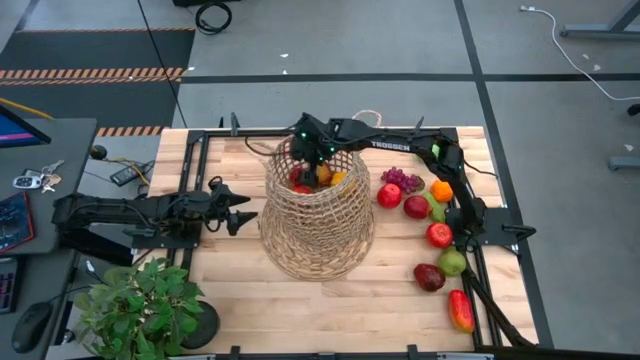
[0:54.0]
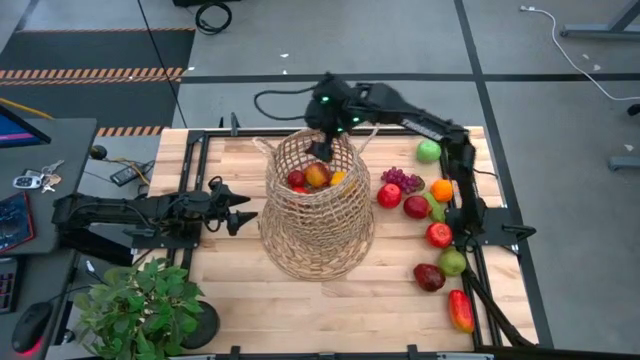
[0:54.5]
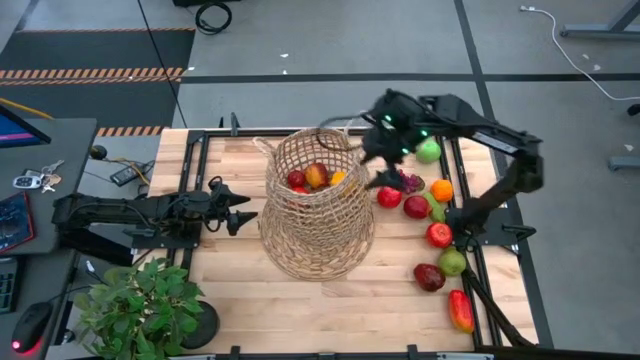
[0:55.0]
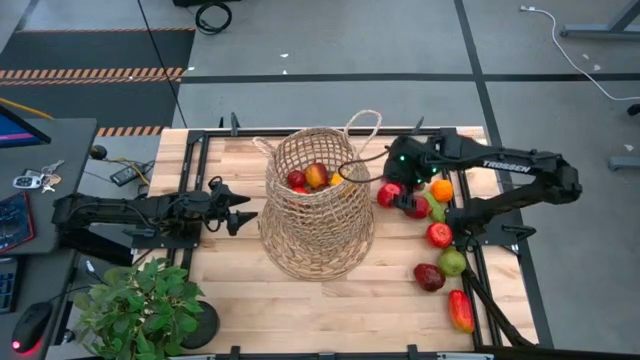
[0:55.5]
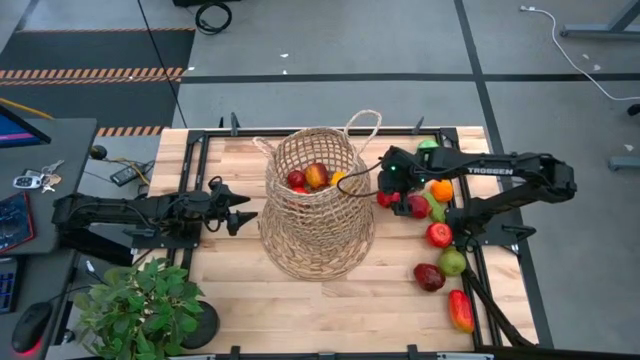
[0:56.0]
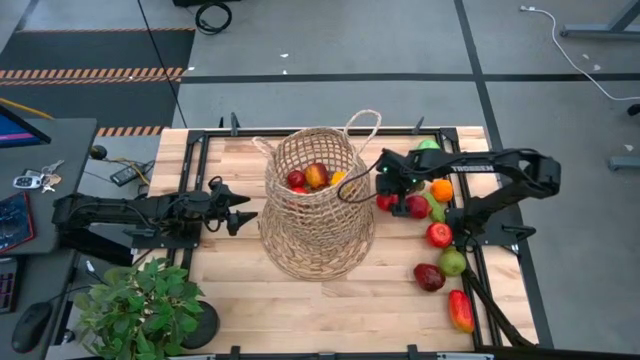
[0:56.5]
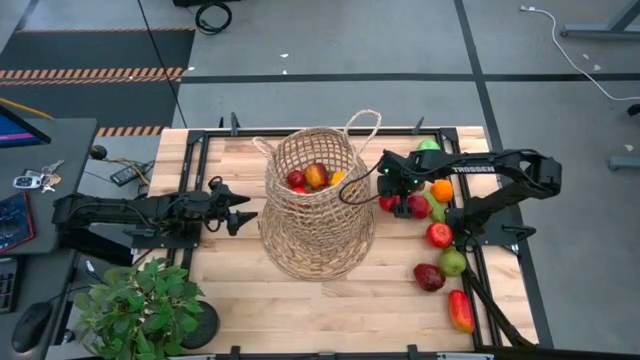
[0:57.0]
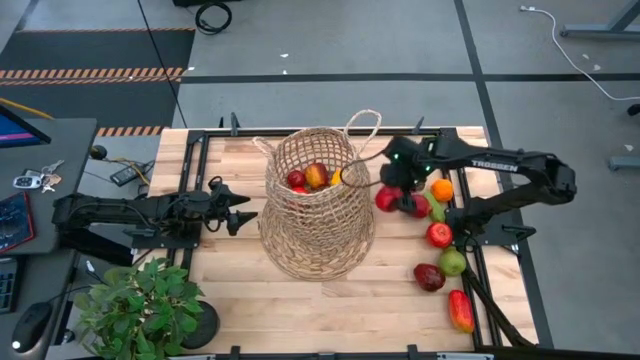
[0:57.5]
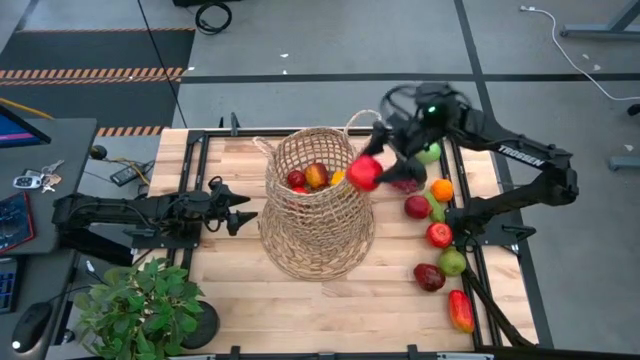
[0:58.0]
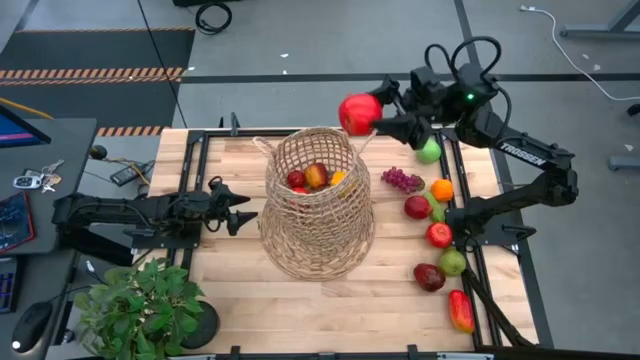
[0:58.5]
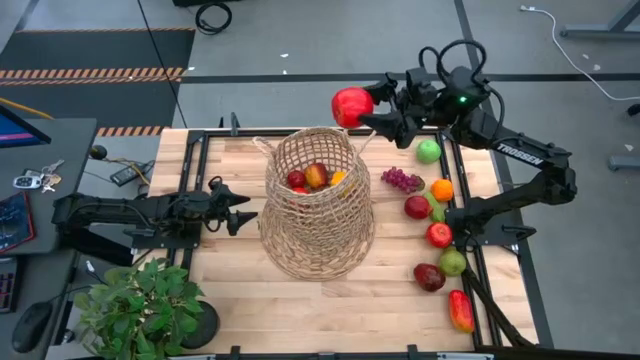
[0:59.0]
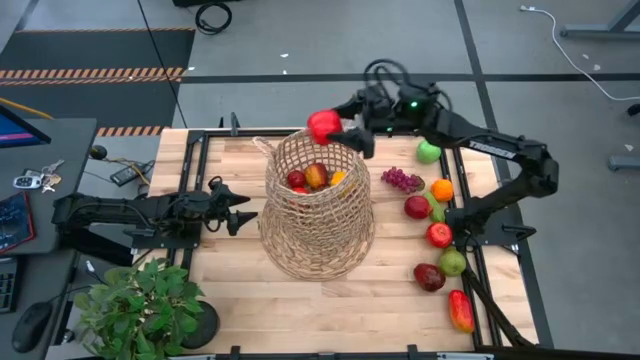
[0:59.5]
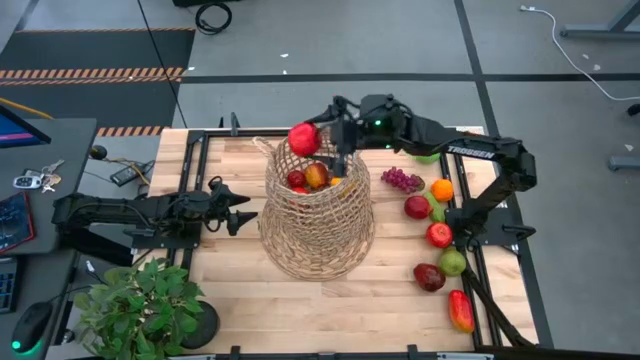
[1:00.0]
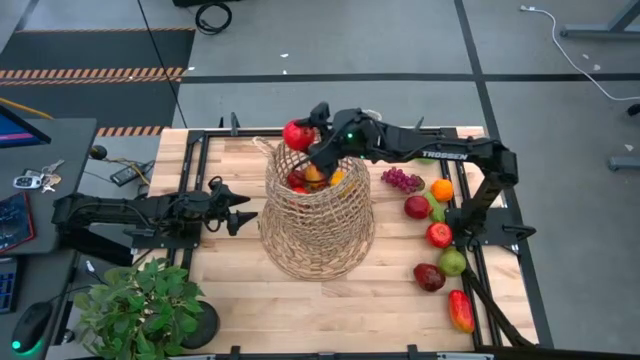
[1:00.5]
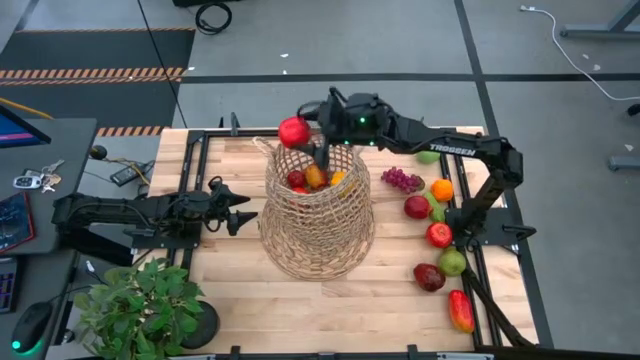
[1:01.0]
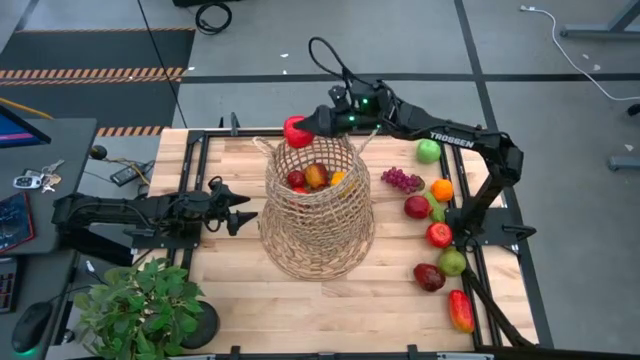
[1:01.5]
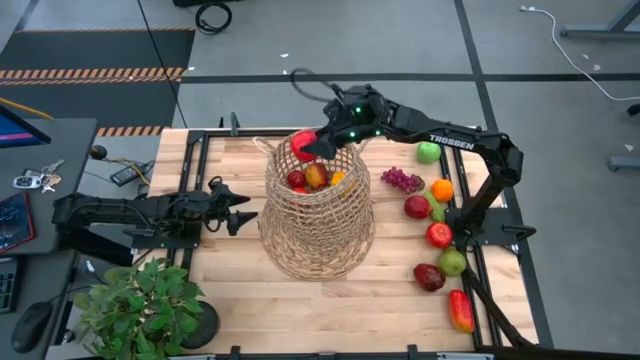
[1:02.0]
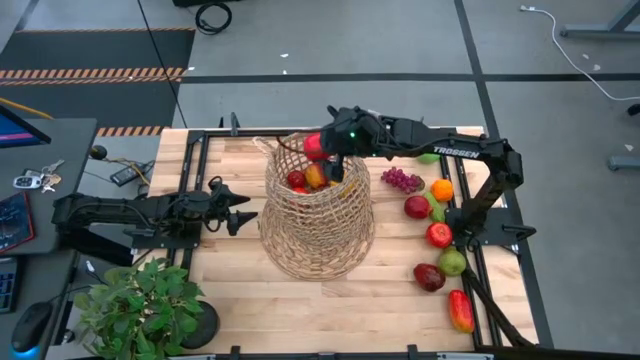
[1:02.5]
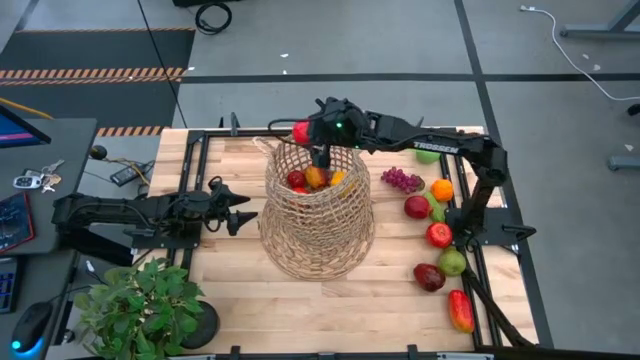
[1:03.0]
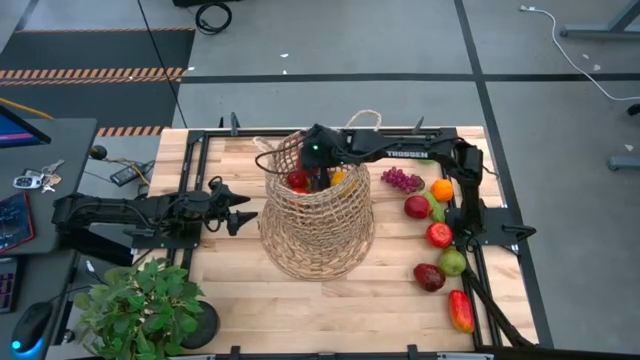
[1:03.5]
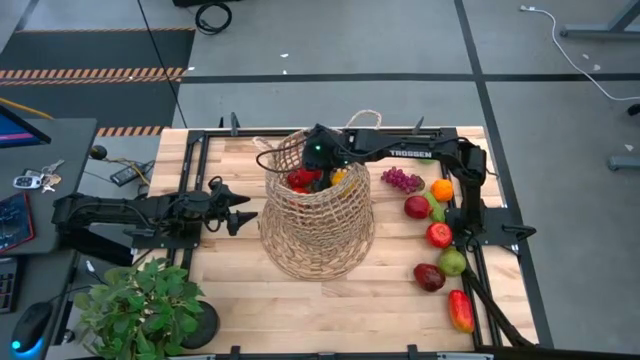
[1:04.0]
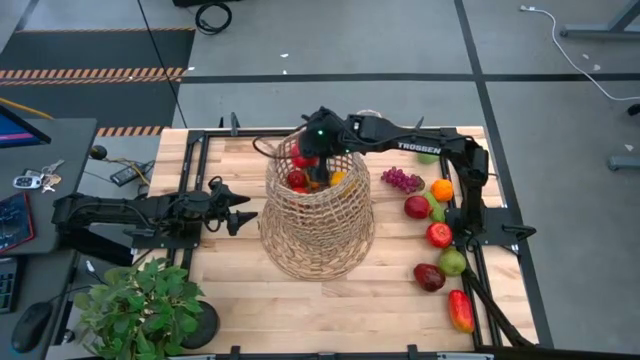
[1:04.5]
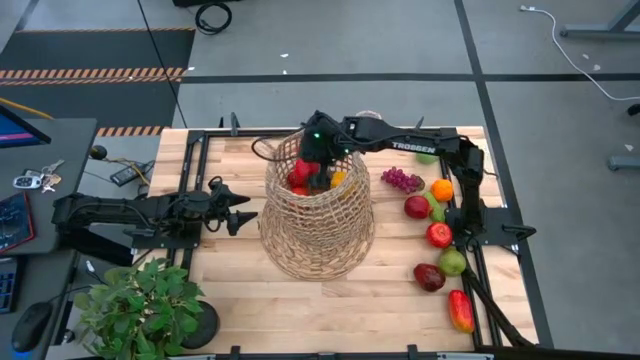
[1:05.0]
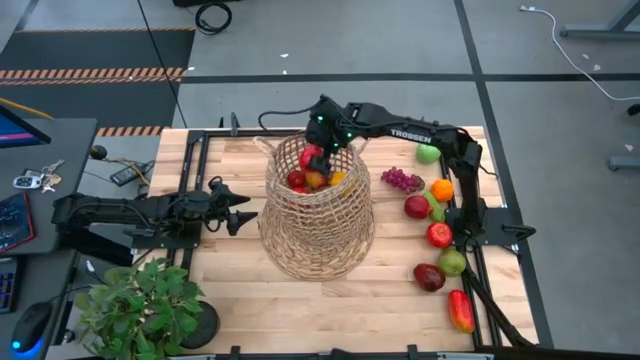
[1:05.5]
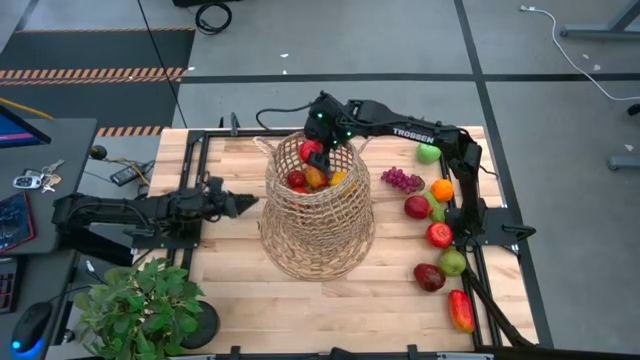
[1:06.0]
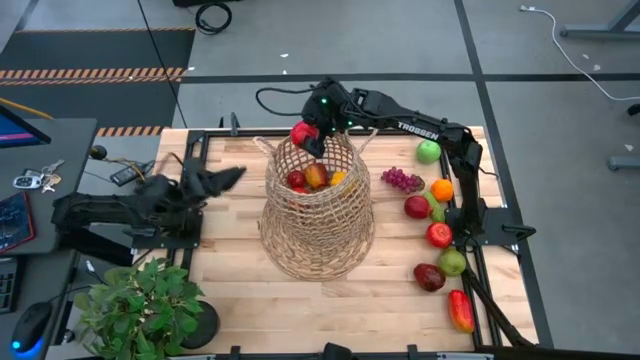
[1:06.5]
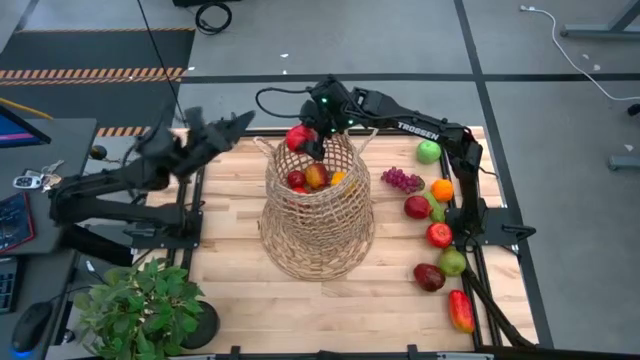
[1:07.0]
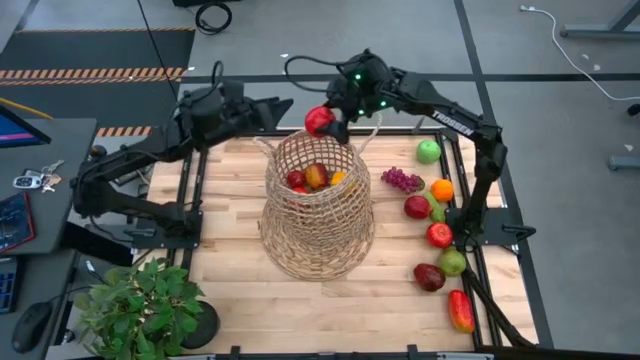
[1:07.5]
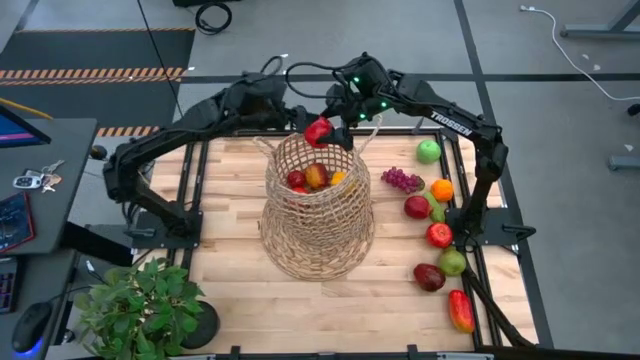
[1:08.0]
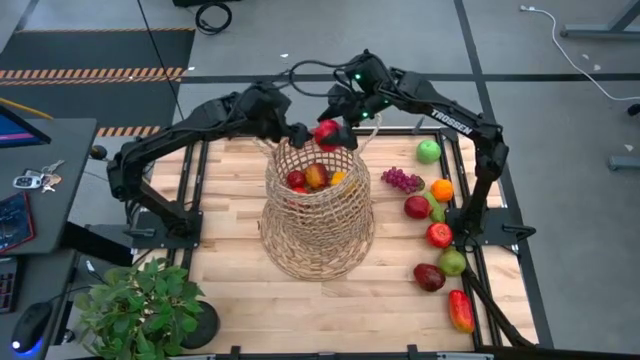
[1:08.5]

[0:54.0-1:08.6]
Task: Build produce basket
Put the red apple into the brown basket

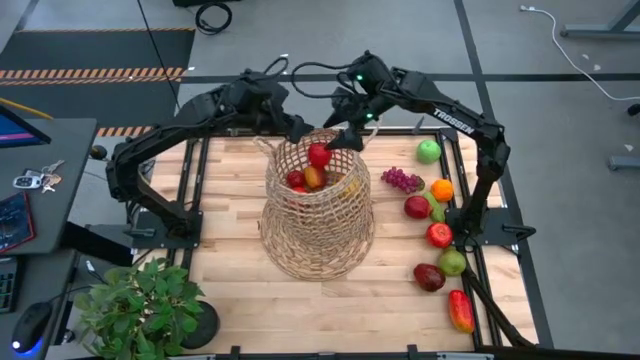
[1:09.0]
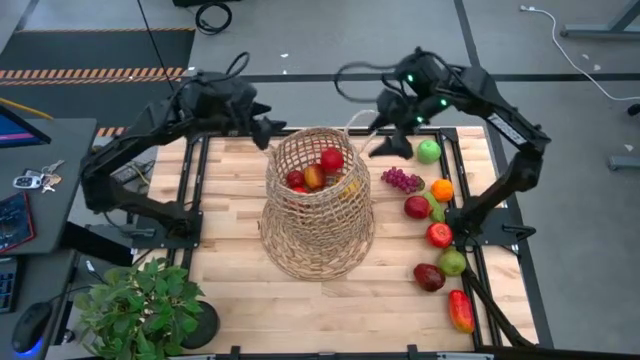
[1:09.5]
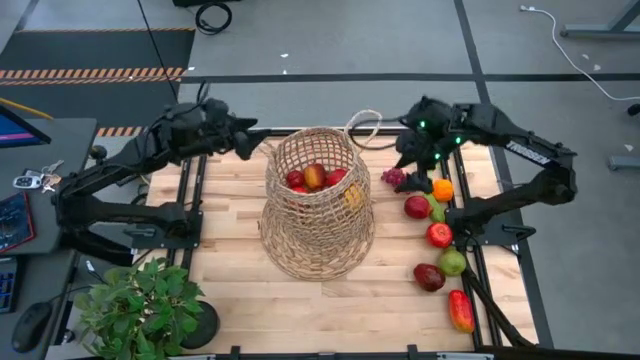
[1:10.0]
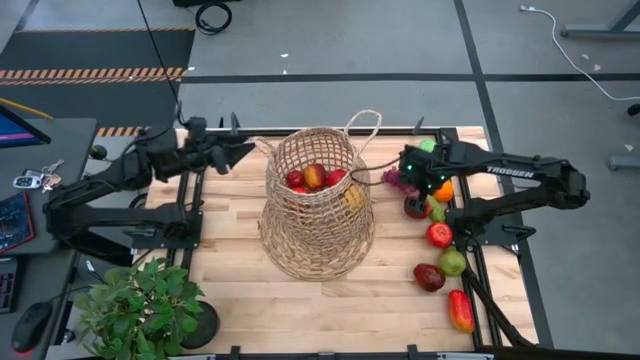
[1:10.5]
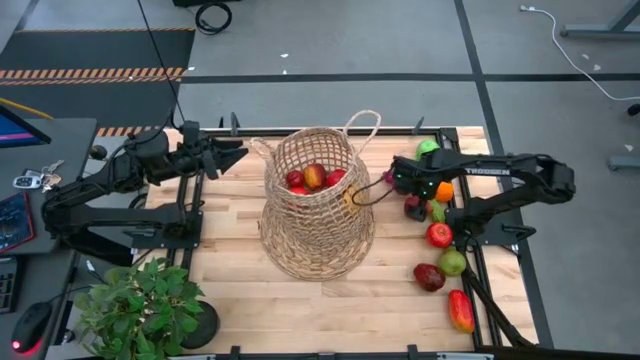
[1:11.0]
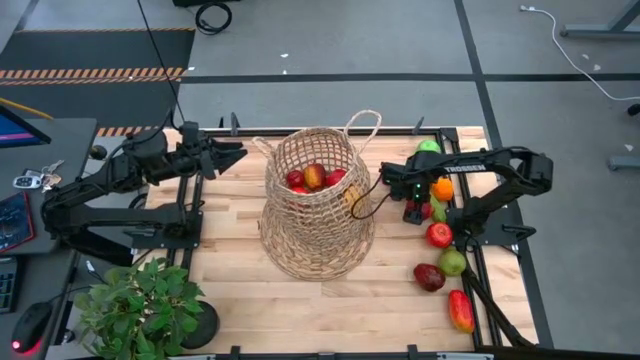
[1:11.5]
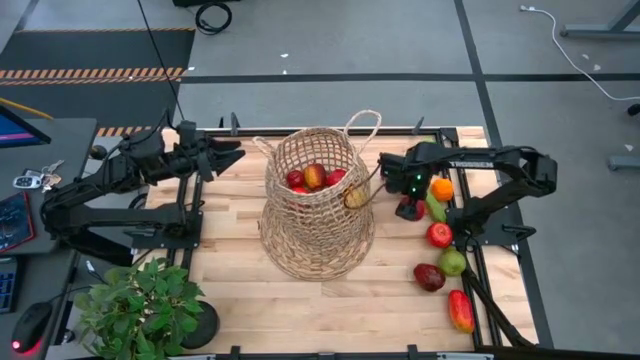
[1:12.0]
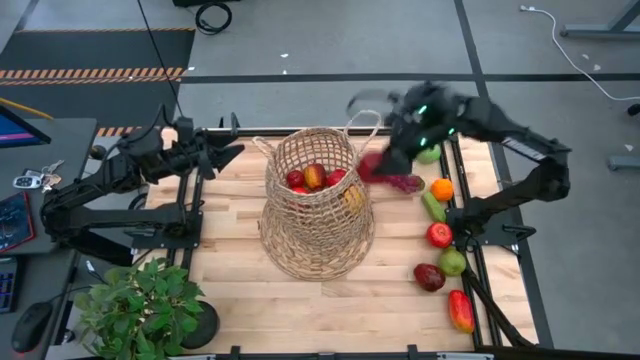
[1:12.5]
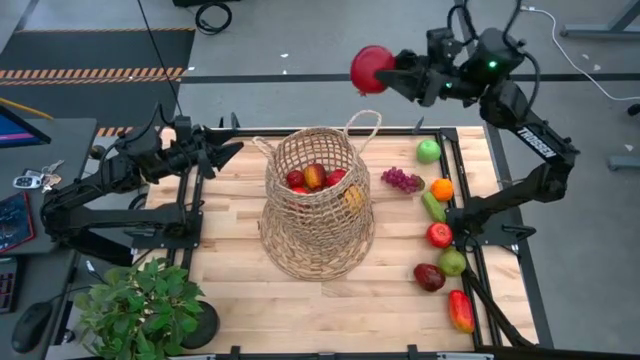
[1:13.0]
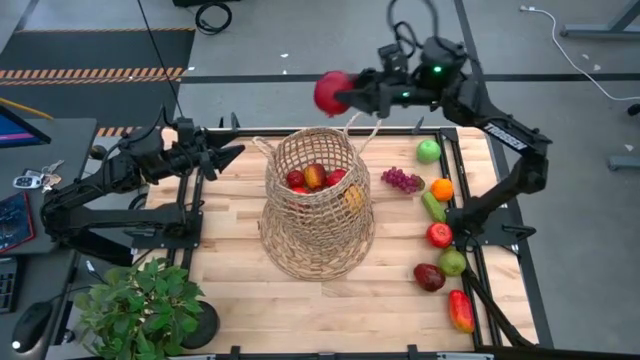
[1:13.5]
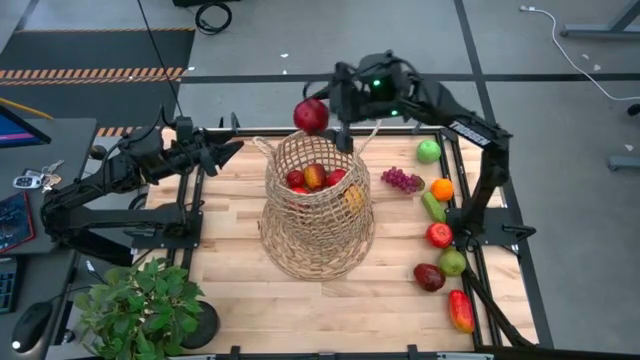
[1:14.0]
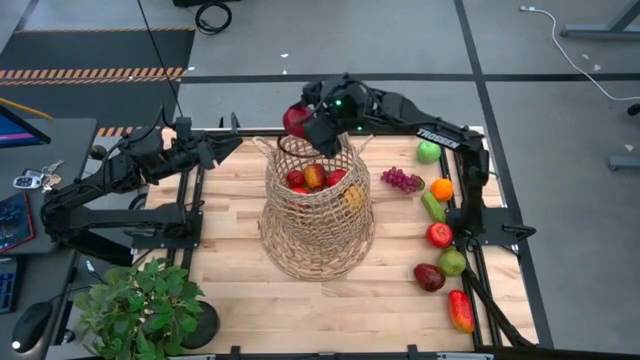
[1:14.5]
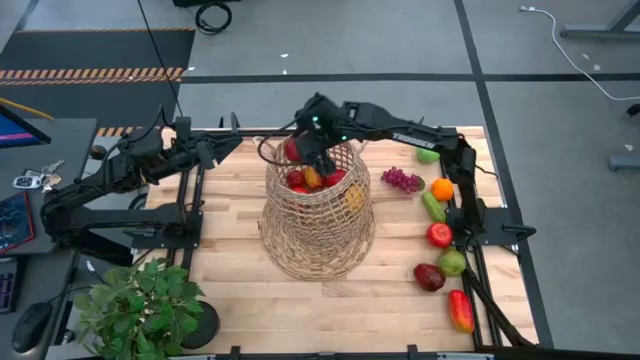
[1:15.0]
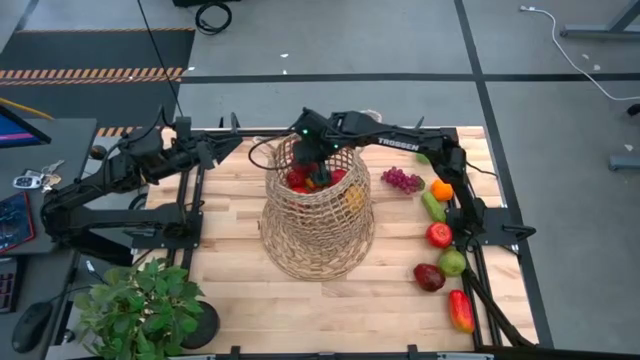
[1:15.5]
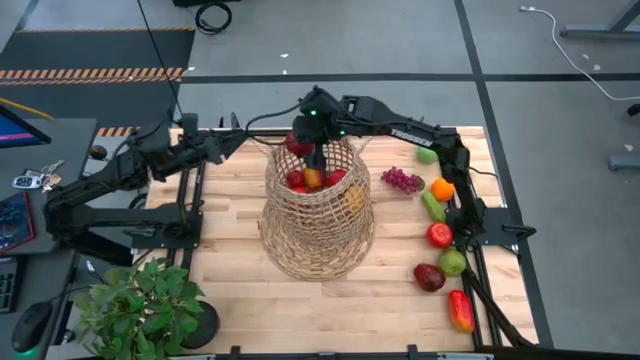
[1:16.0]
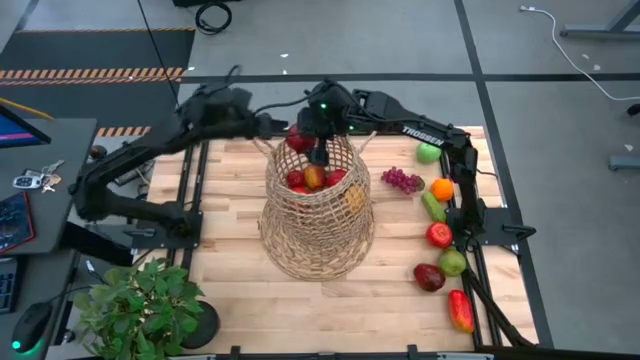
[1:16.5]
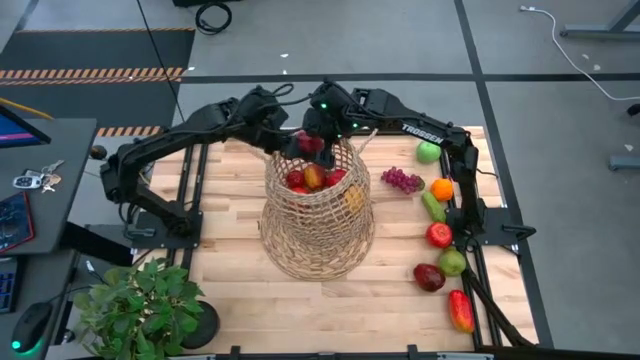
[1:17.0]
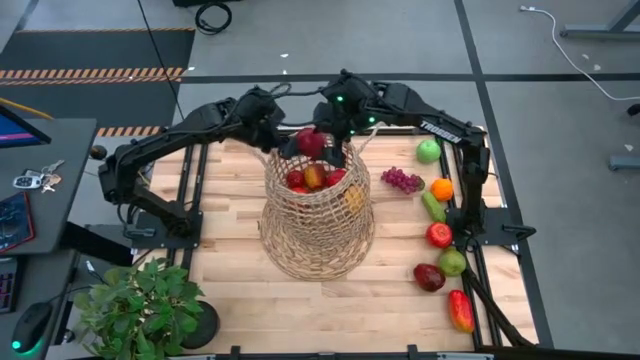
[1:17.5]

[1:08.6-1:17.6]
Put the pomegranate into the brown basket
